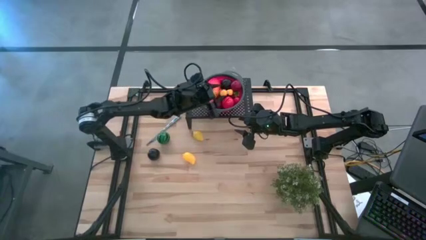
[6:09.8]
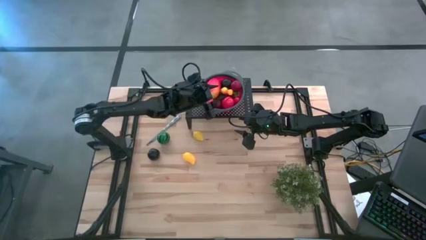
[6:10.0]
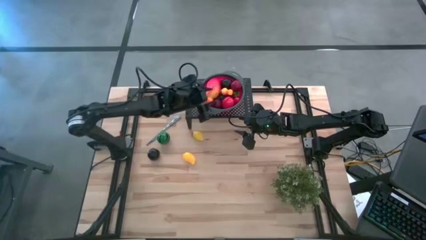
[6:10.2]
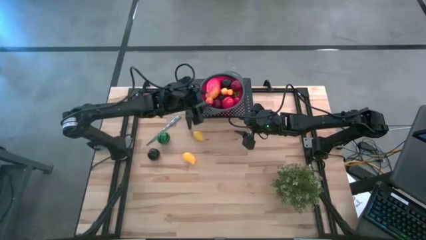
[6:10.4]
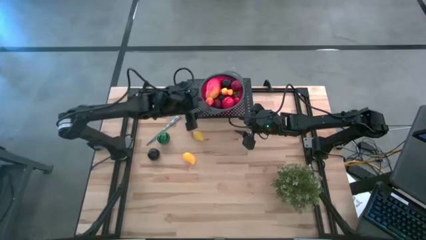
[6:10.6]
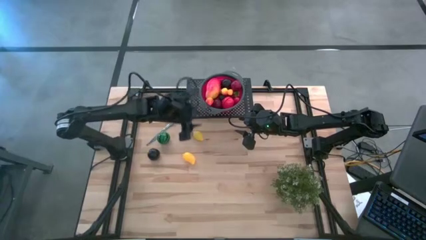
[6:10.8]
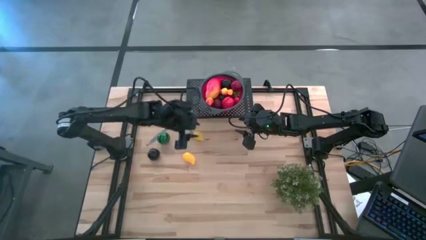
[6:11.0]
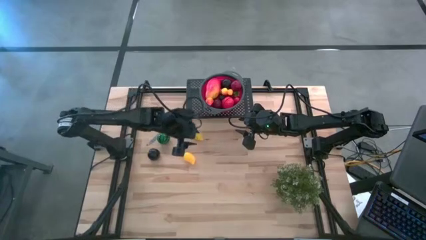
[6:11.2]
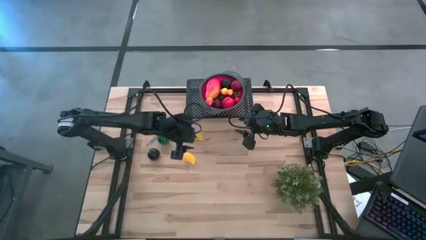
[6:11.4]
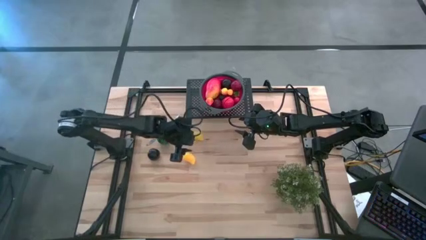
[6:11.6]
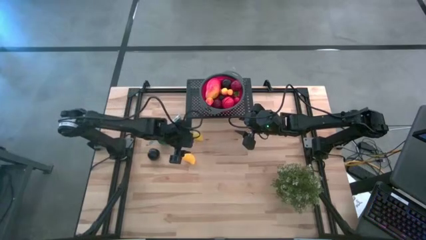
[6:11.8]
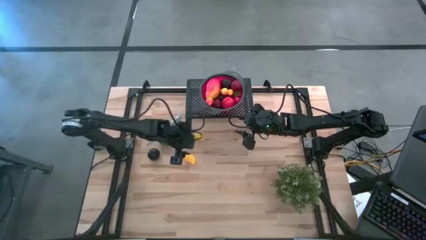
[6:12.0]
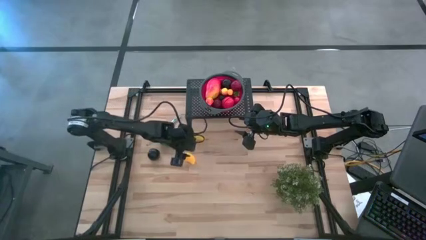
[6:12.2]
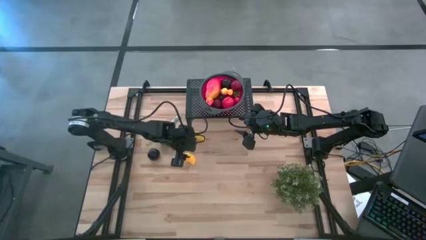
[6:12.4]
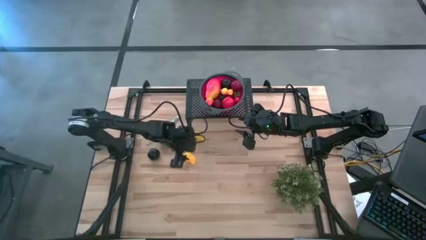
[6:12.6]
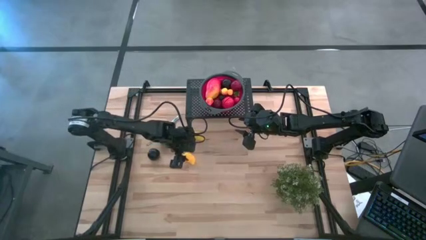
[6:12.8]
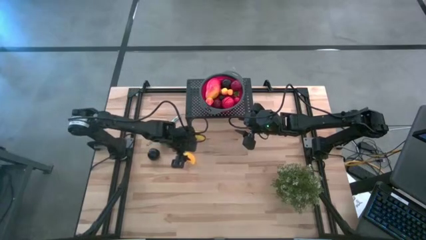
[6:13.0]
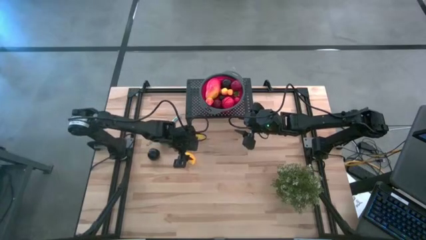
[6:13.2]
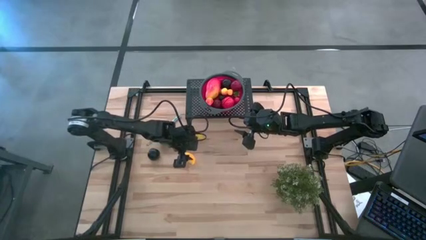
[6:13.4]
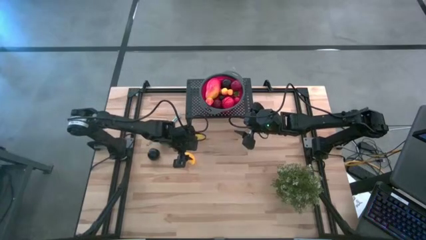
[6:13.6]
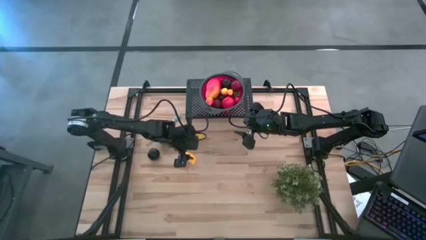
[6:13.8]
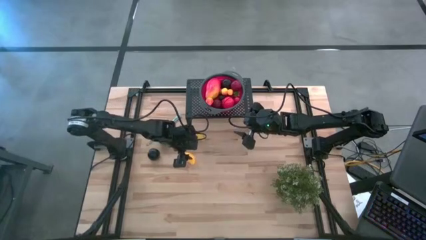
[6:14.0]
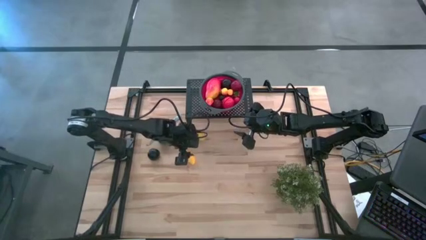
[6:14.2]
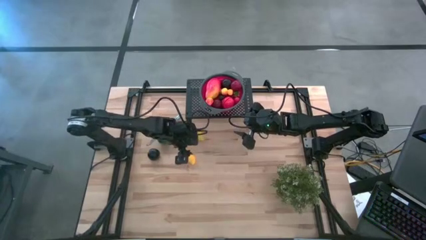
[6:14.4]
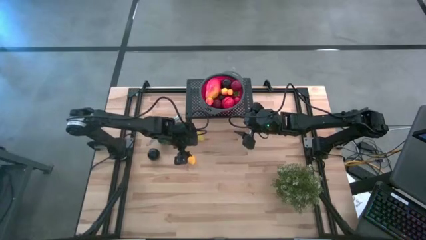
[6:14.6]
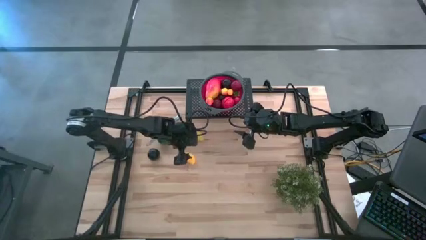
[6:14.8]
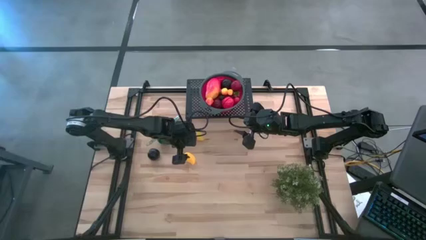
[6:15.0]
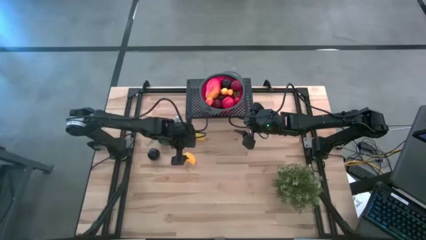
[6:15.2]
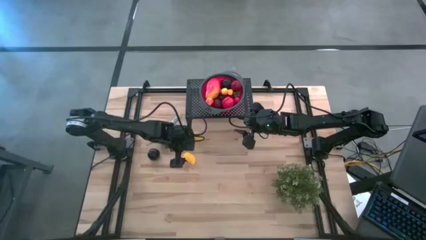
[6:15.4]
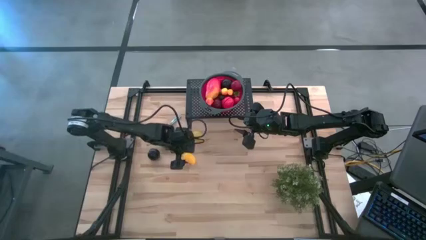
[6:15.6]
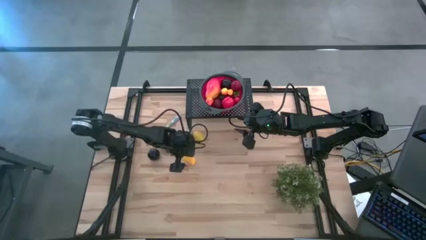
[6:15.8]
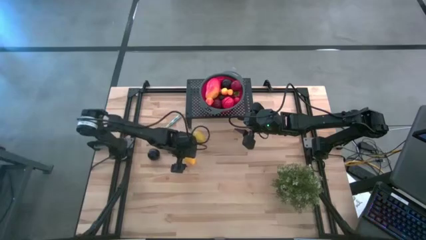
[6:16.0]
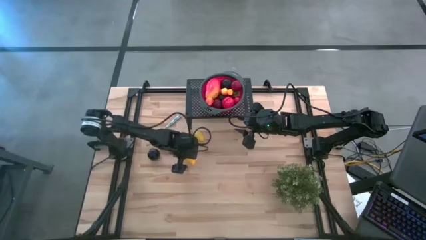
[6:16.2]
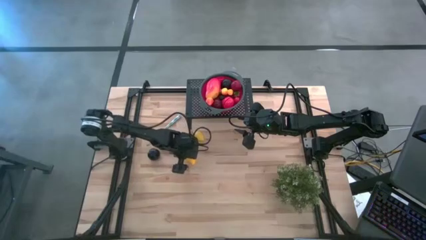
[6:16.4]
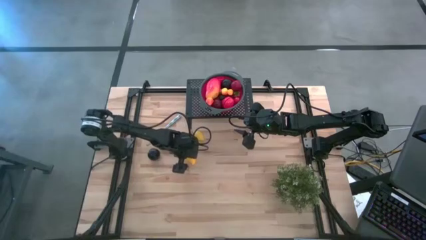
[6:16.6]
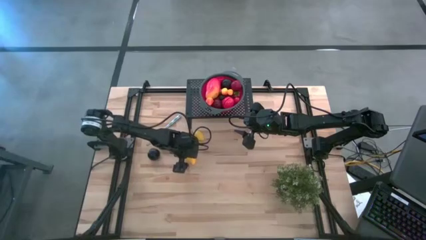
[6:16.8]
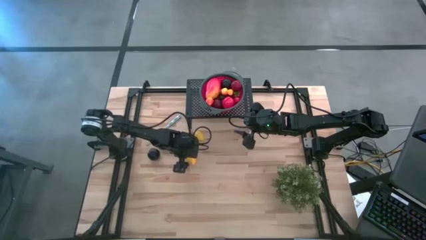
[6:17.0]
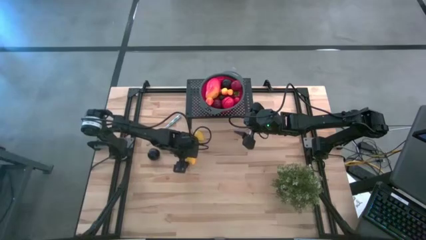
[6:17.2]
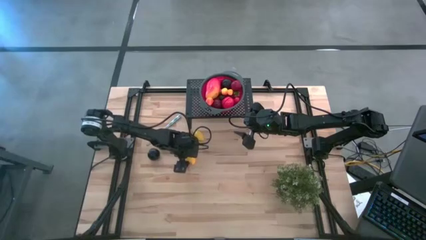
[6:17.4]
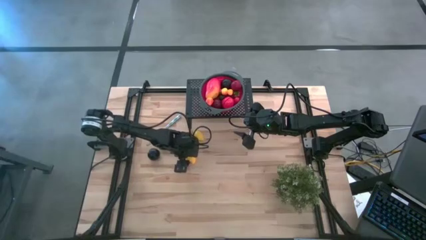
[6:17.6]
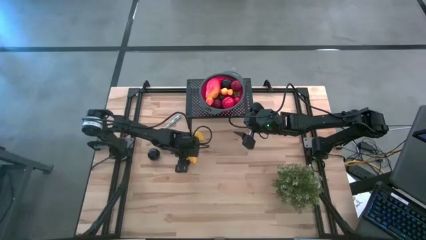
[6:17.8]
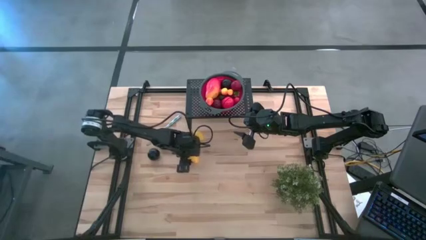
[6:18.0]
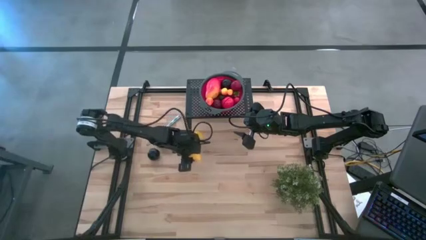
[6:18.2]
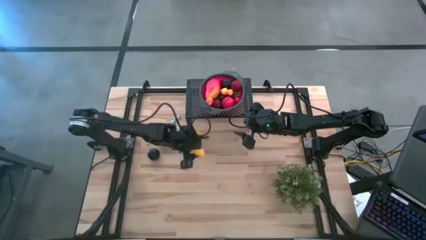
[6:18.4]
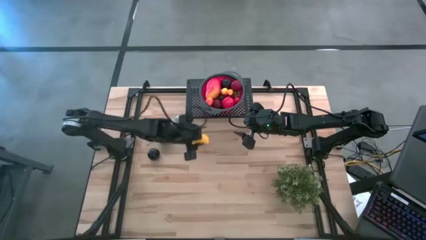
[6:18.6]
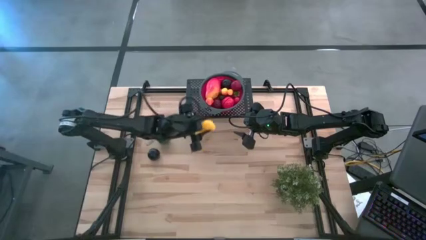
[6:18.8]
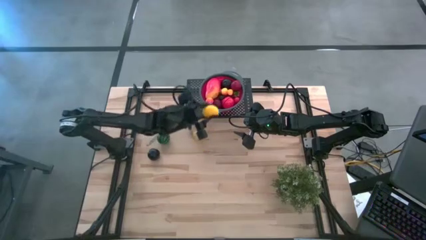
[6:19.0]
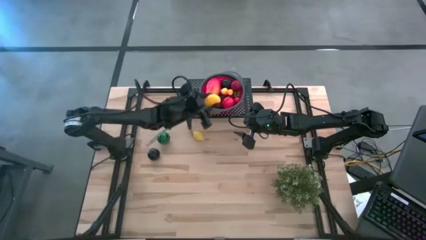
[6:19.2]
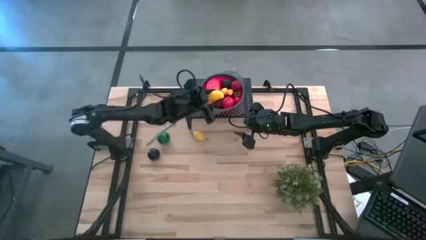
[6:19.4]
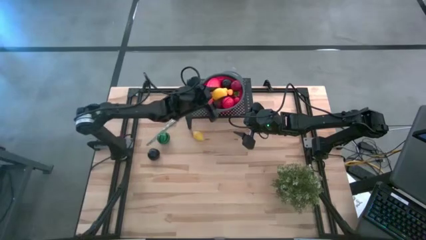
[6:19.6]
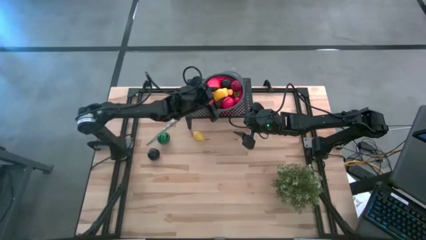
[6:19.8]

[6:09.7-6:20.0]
Task: Pick & Place Fruit
Put the mango in the red colander on the shelf

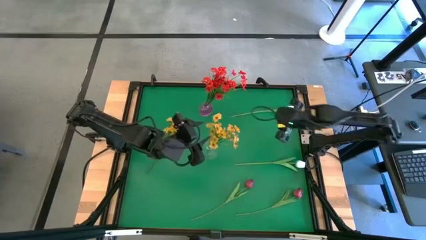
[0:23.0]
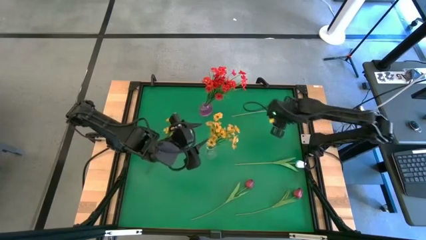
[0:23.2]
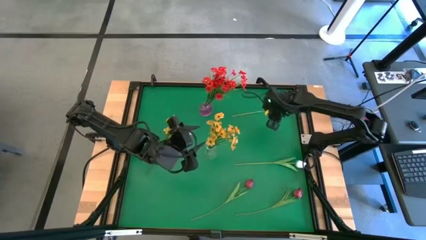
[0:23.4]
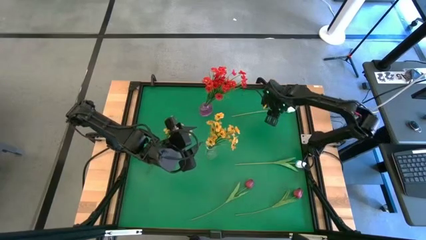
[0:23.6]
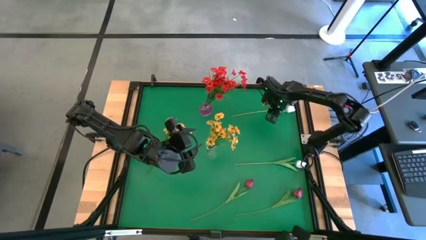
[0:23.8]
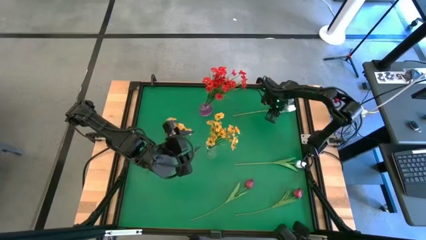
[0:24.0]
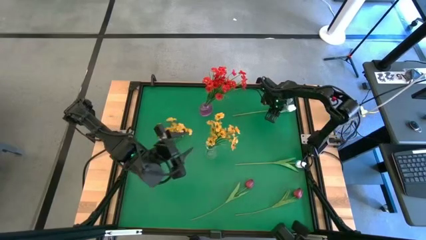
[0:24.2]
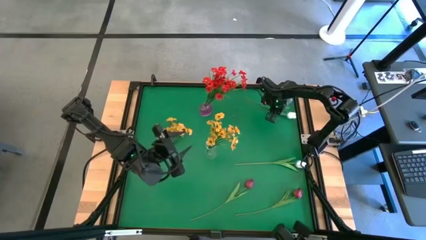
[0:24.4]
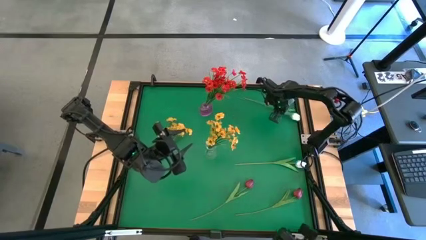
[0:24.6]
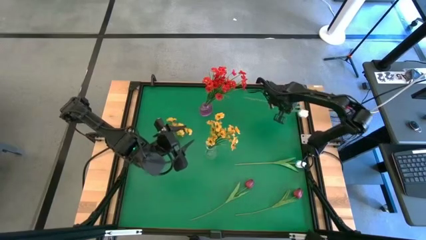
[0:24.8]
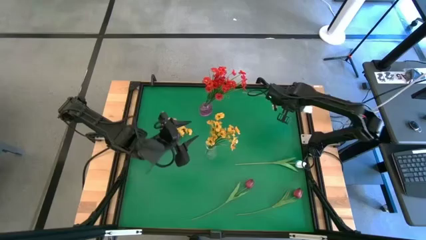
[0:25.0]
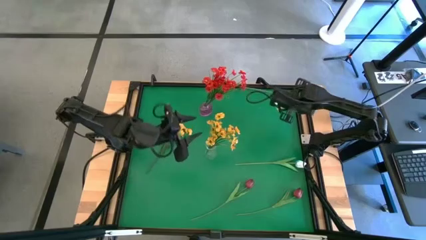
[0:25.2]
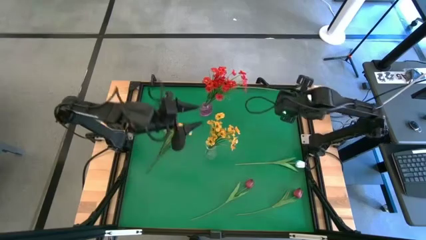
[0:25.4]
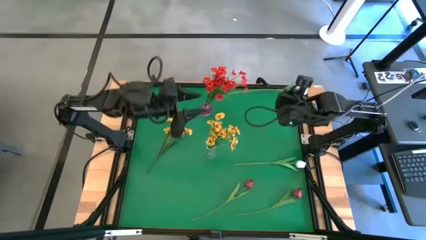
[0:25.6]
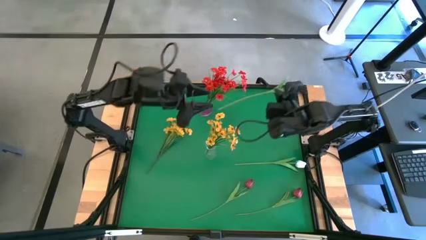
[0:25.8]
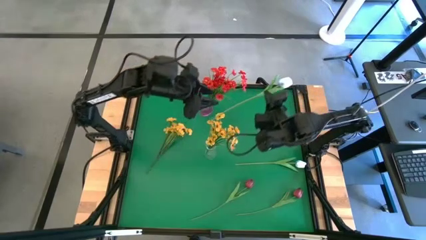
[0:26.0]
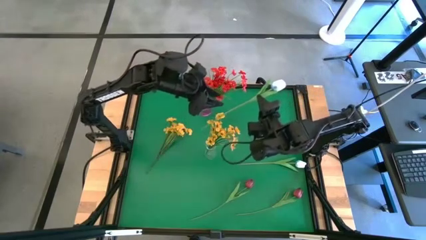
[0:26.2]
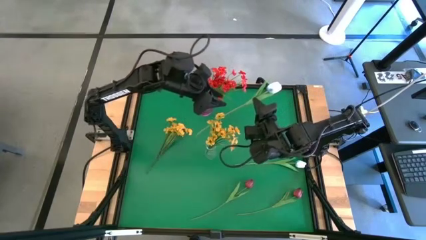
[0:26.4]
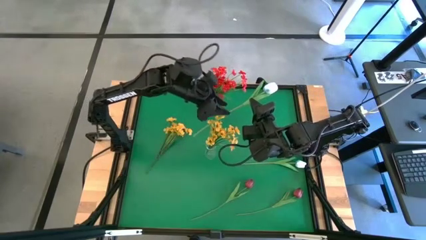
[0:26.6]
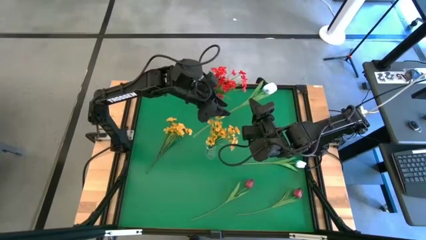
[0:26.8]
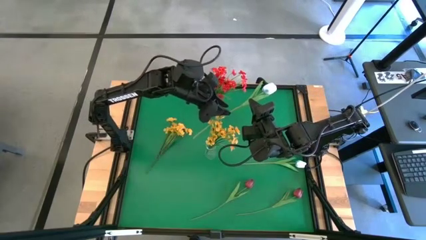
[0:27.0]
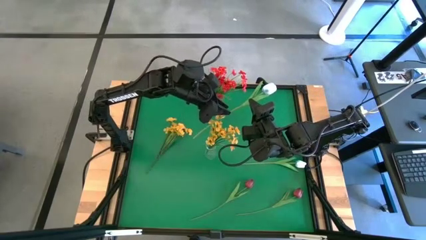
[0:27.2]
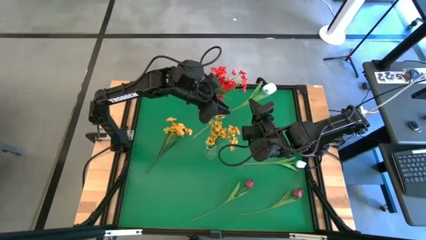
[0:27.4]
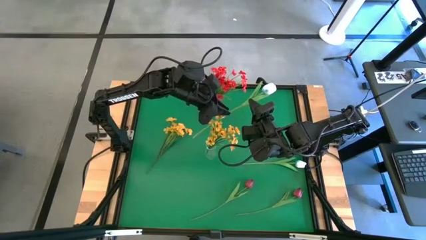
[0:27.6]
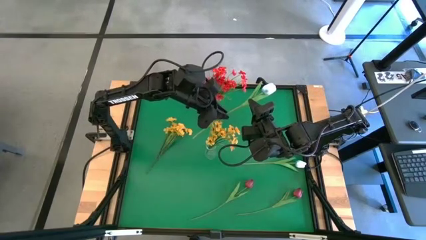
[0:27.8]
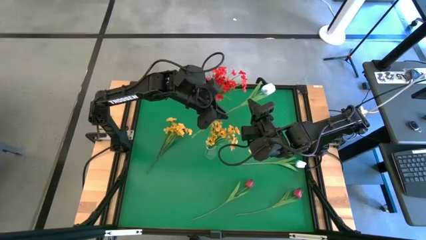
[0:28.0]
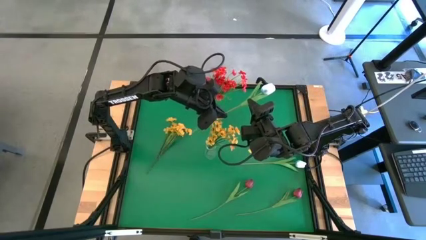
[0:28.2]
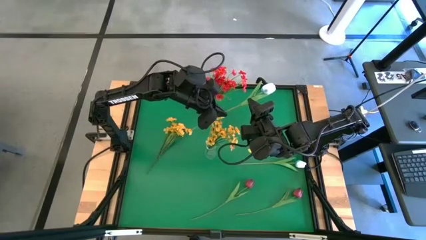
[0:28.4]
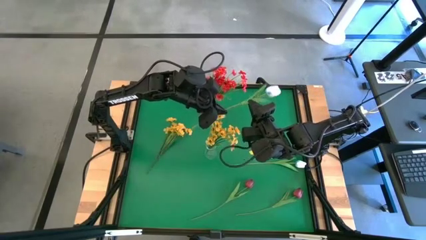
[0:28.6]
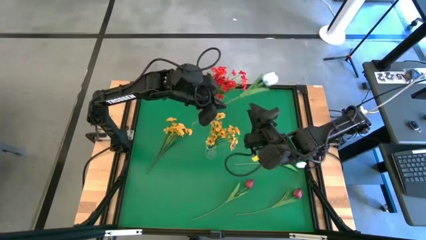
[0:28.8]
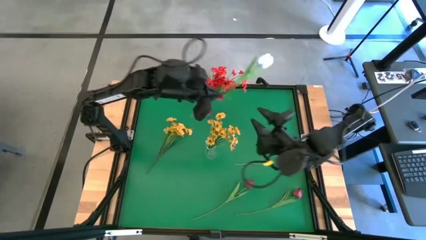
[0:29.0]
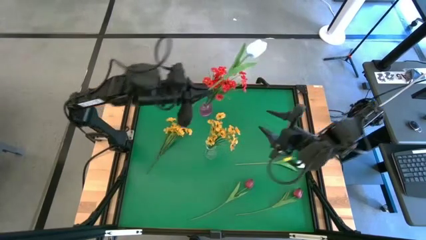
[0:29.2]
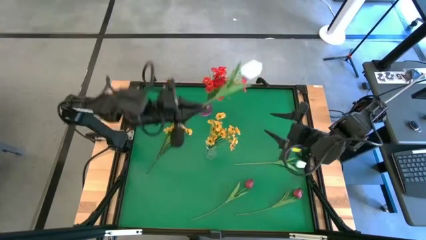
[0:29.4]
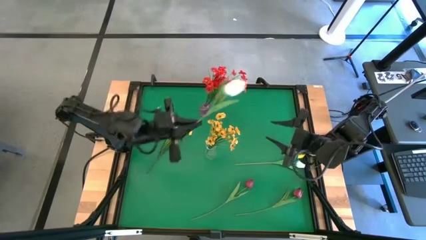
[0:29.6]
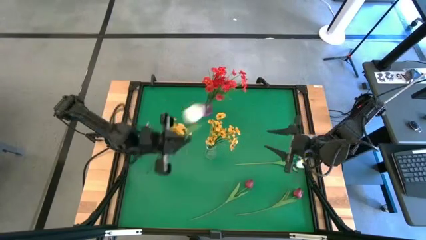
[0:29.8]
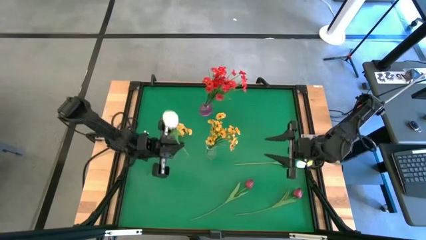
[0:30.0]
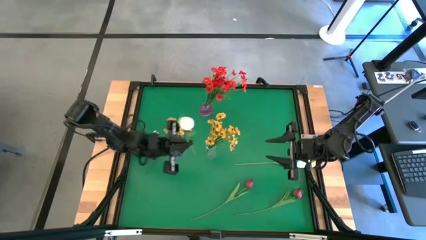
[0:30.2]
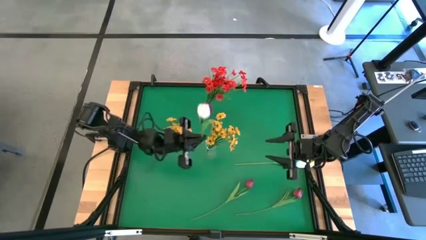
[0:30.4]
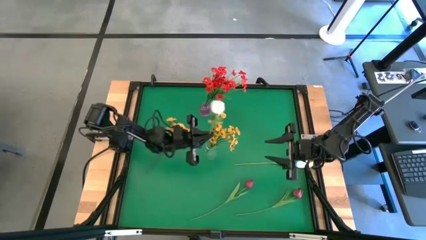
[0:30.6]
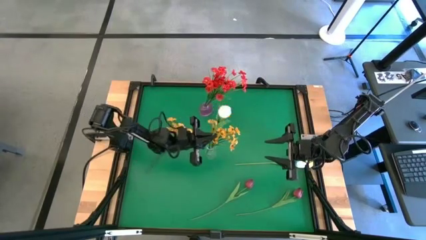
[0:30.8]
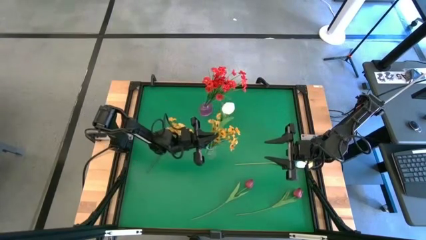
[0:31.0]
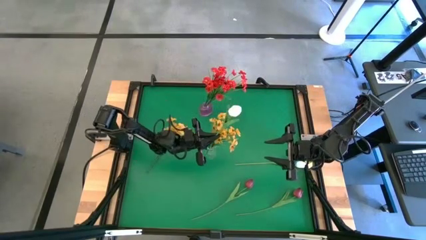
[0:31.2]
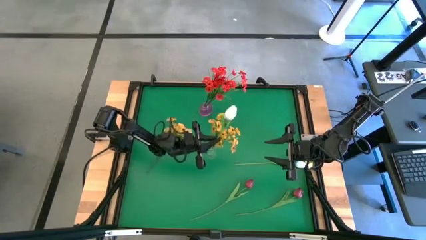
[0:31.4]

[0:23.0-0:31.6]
Task: Sort flowers into vase by color
Put the top white flower into the transparent vase
